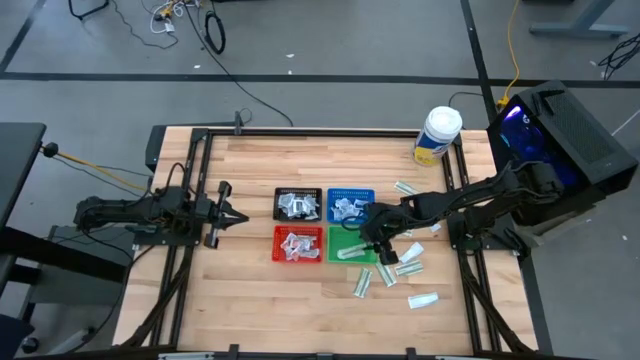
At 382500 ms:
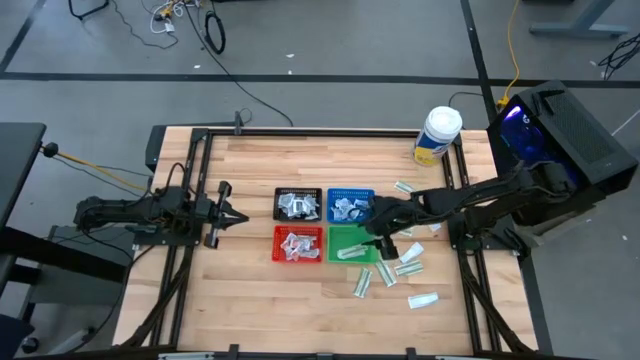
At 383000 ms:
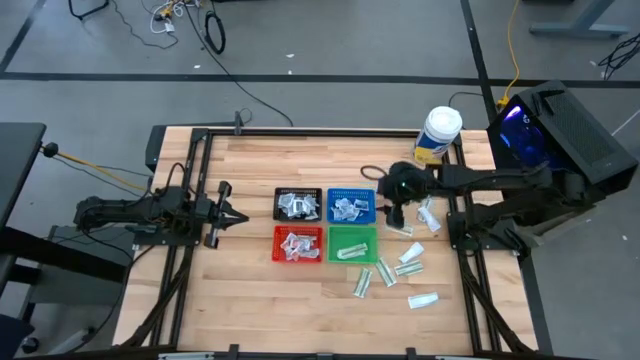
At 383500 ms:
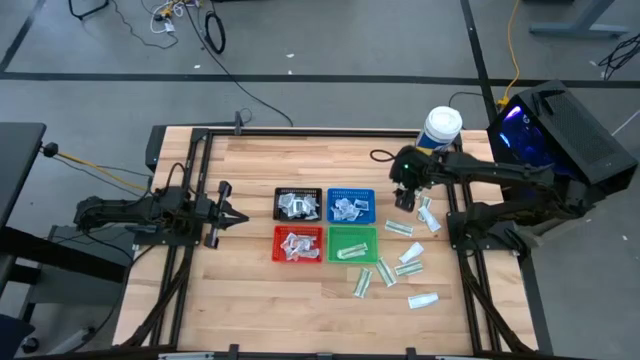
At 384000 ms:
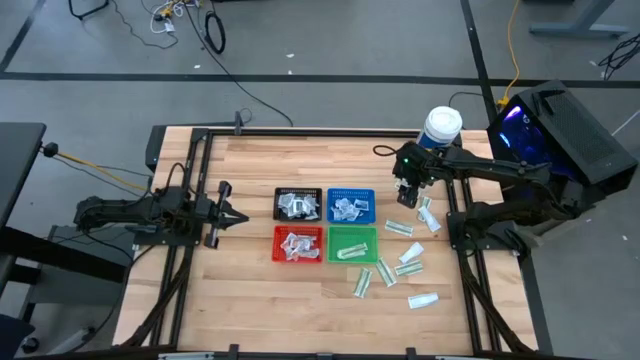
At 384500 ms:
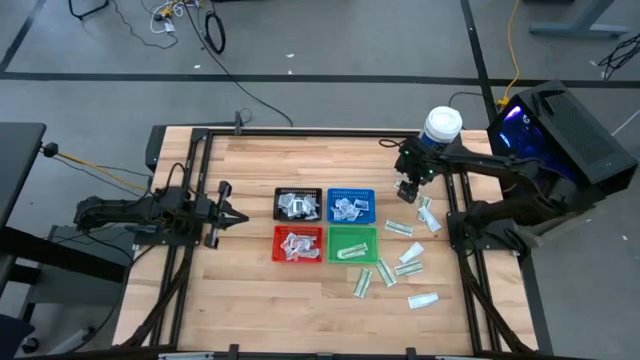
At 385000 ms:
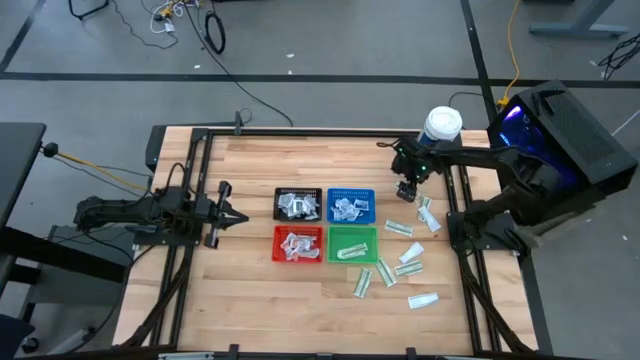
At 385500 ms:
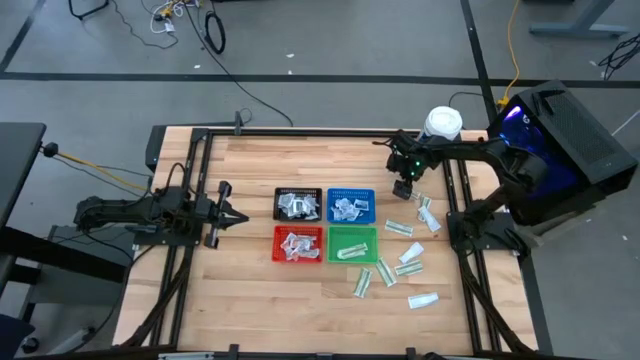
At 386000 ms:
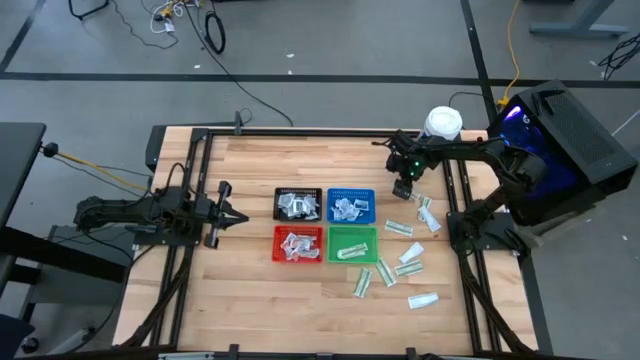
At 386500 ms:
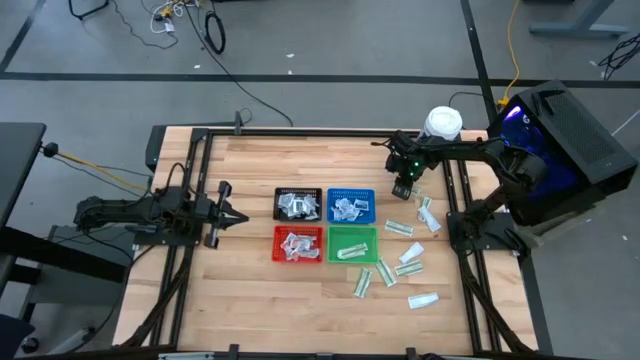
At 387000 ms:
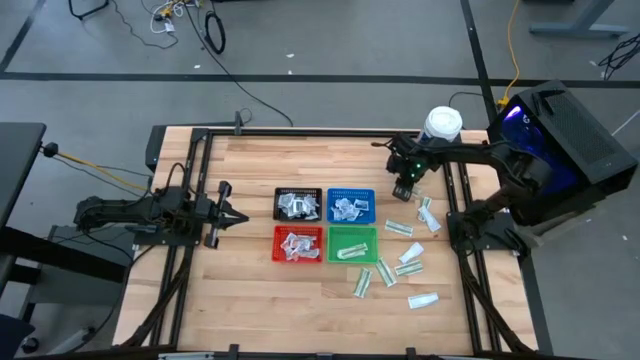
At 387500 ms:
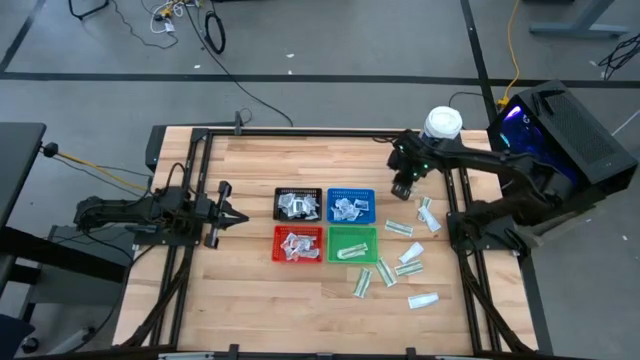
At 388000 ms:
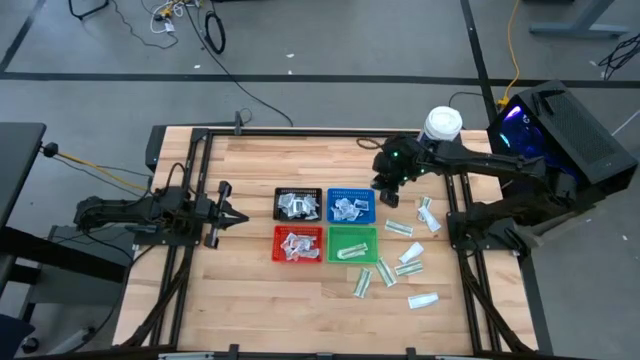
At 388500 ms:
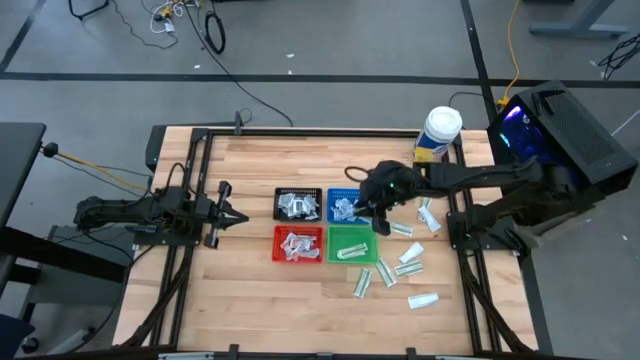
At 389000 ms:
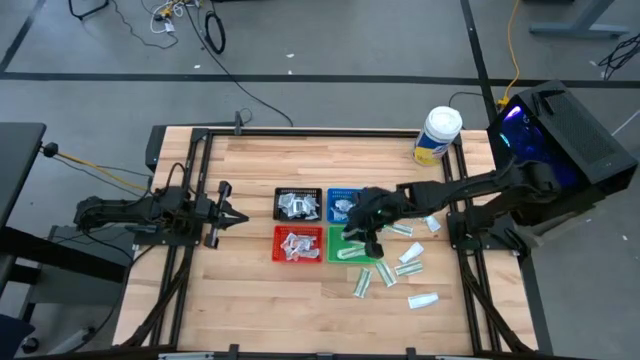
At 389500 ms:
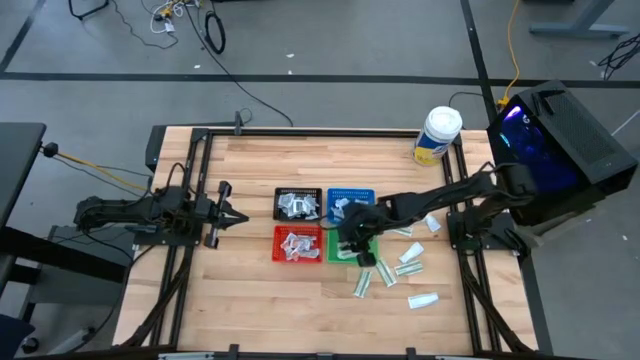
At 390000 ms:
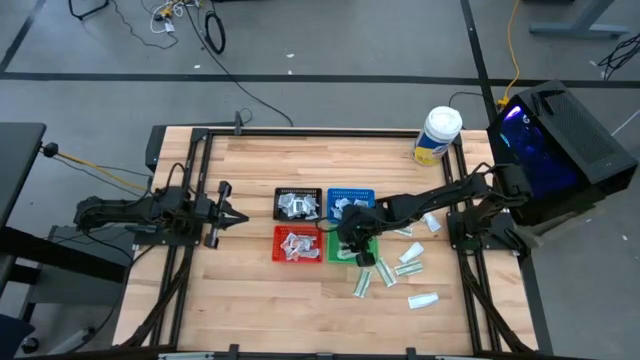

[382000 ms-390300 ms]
Task: Pick & Place First Aid Supplies
Put the green bandage pack into the green bin

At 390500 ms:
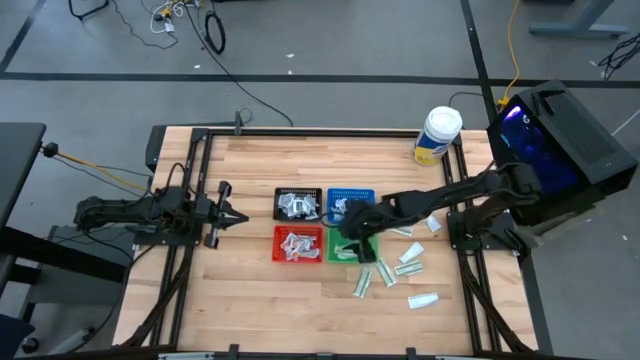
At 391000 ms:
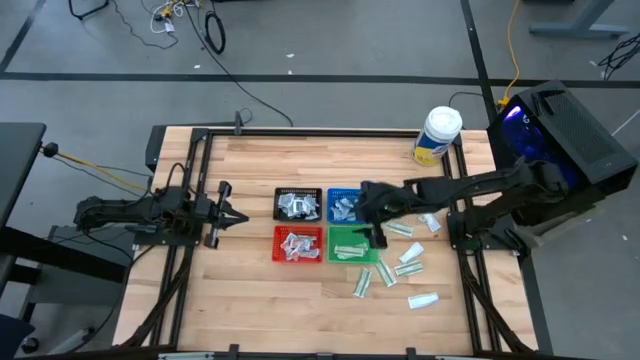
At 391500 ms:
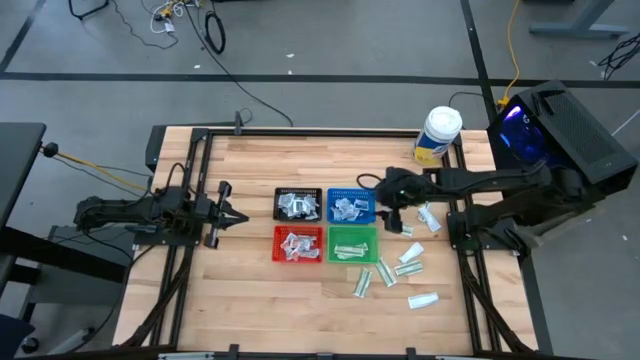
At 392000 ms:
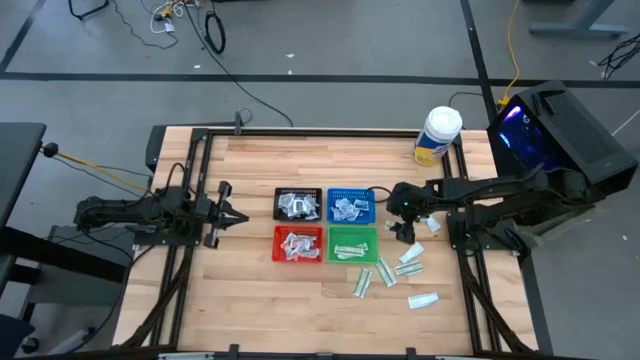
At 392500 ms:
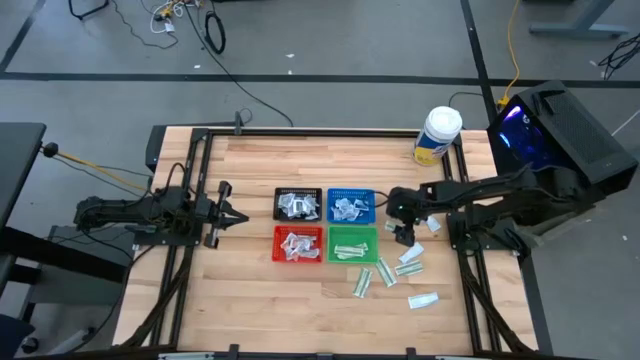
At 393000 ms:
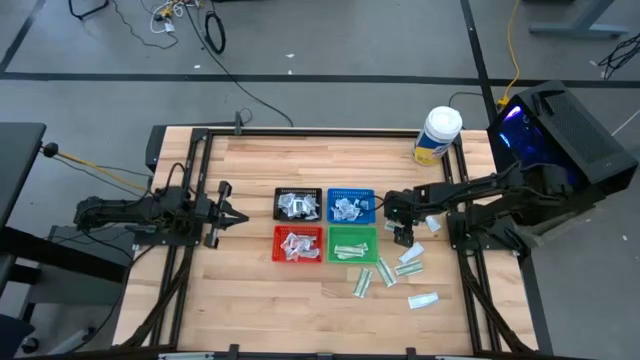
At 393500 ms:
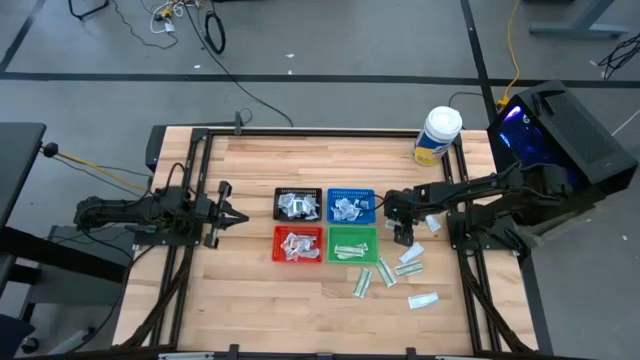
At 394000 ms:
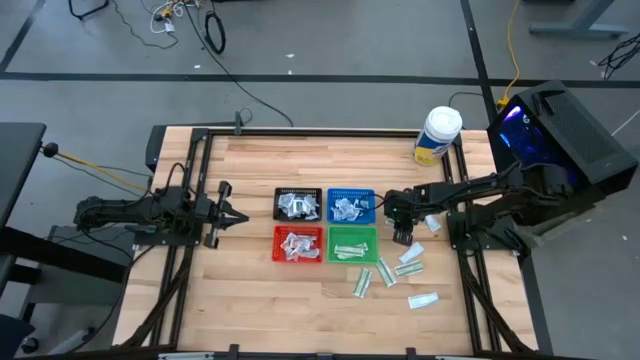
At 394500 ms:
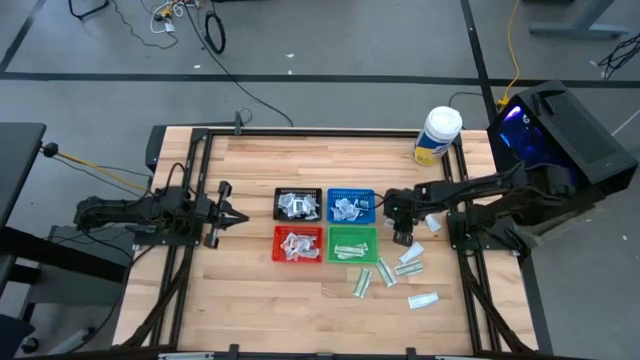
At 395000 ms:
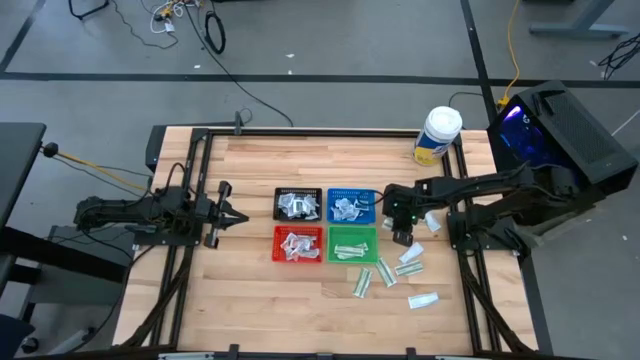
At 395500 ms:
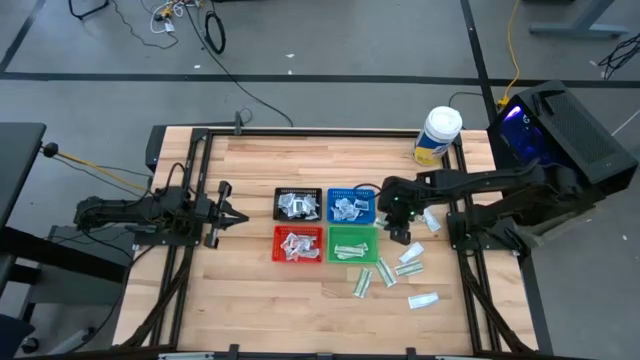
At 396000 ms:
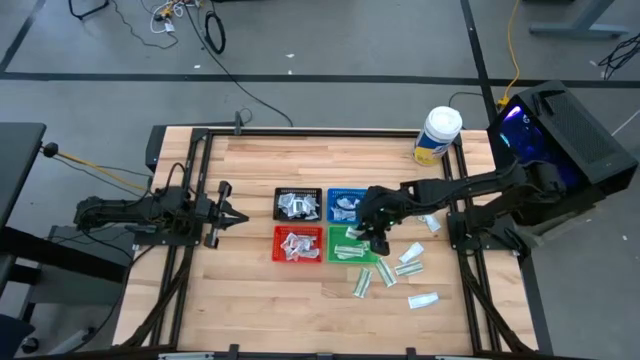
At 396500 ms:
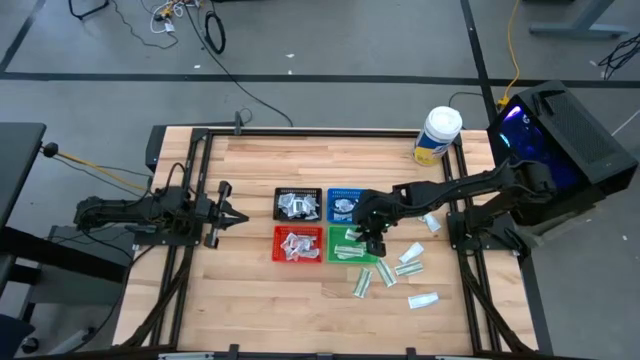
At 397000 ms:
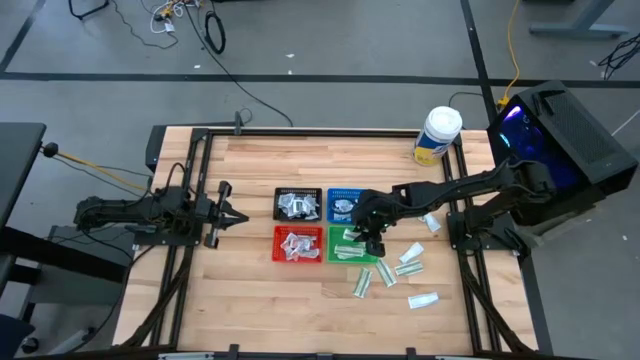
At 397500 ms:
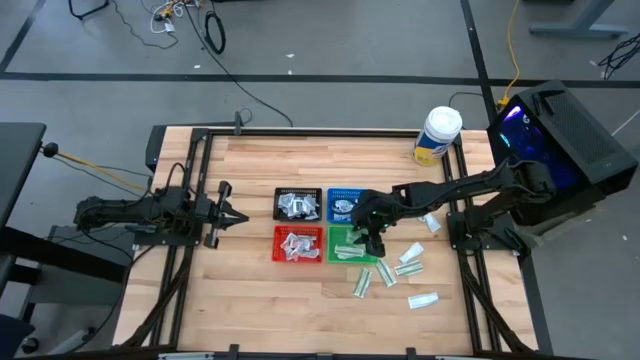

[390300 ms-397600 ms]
Put the green bandage pack into the green bin

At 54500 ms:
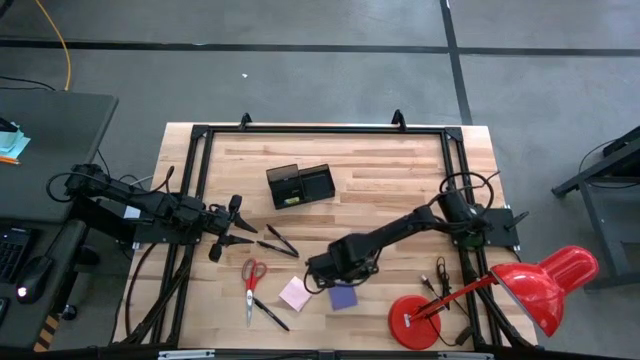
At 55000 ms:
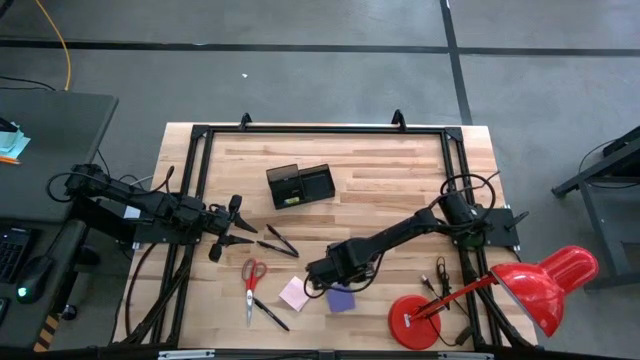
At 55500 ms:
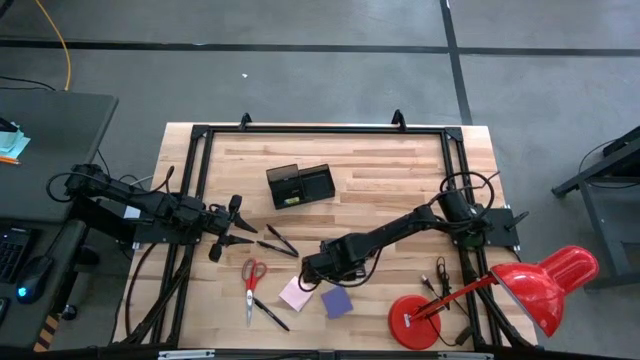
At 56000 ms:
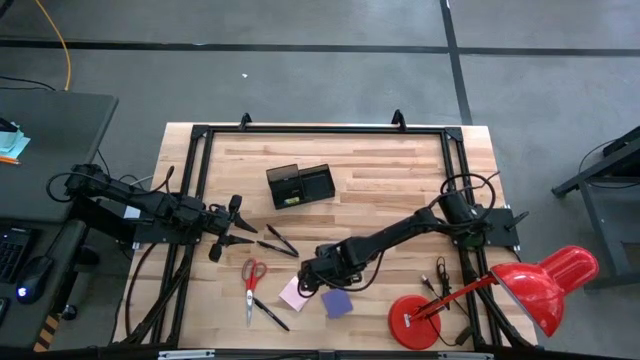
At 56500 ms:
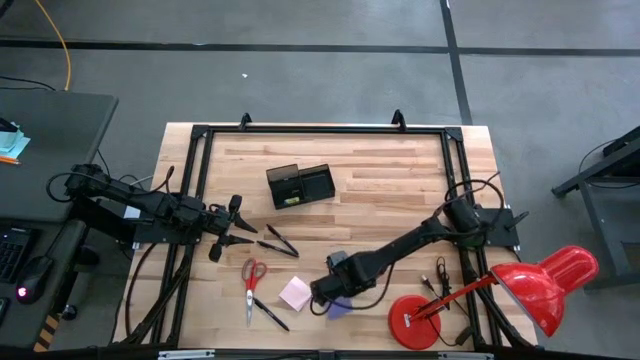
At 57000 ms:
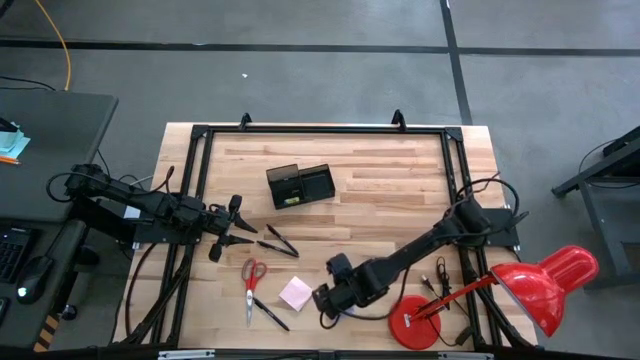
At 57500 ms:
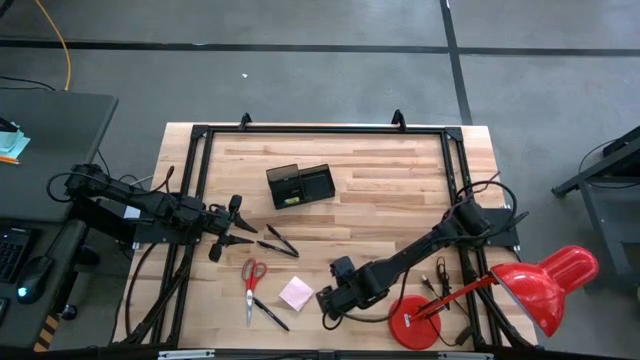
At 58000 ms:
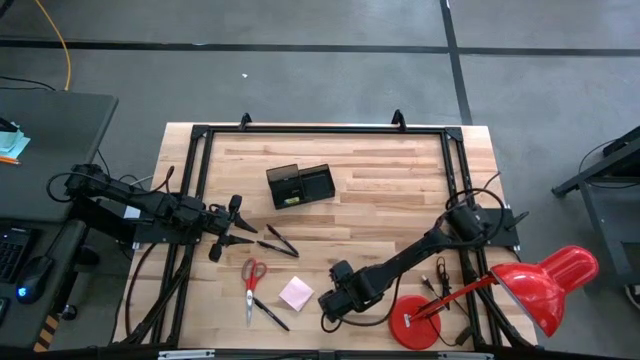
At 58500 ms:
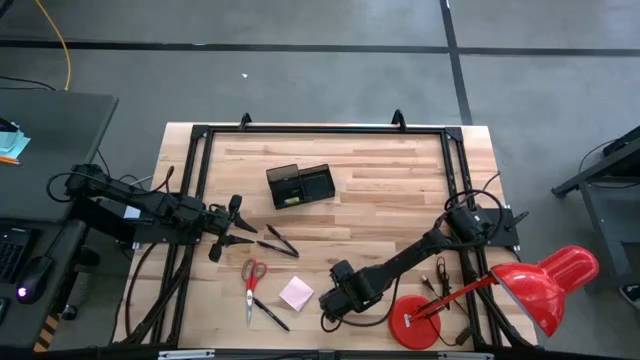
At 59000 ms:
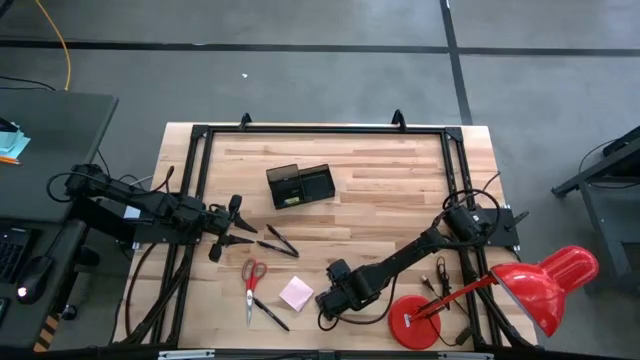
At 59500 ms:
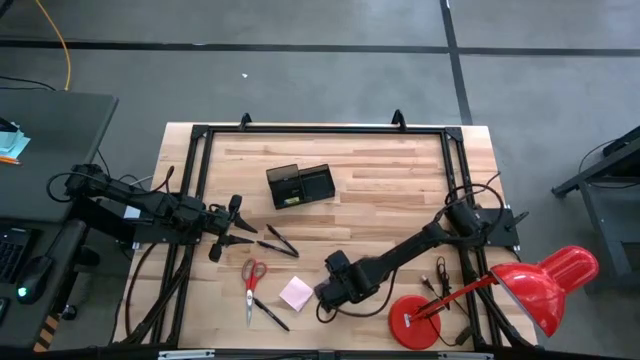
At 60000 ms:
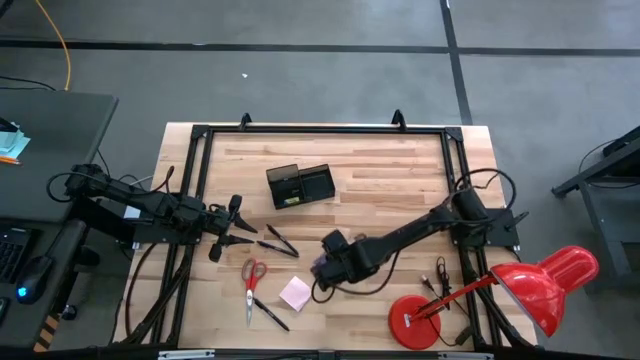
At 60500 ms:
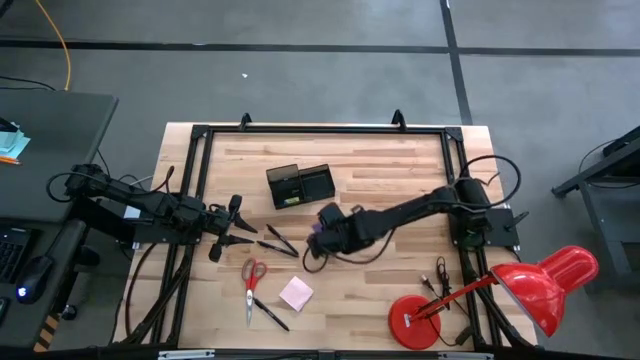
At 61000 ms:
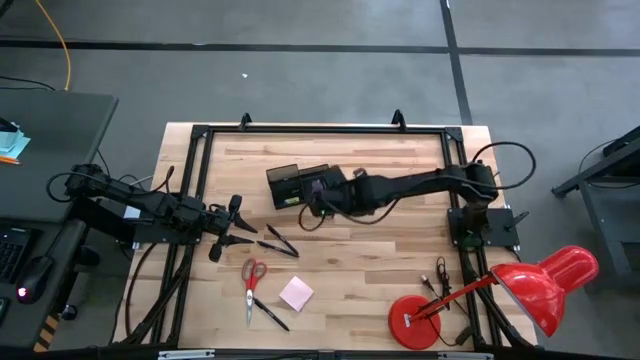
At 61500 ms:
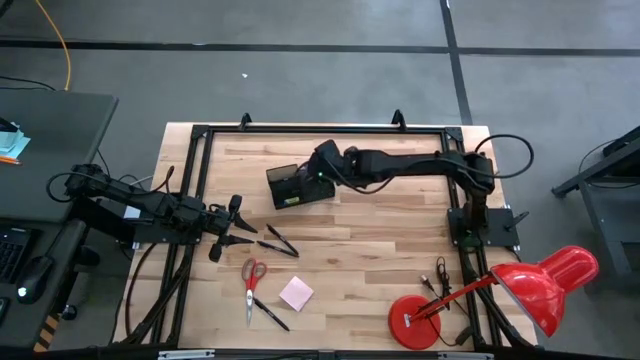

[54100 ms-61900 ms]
Task: Pick and place office supplies into organizer
Put the blue sticky note into the black desk organizer
